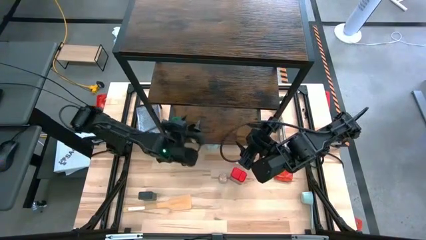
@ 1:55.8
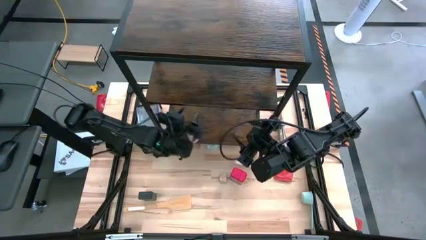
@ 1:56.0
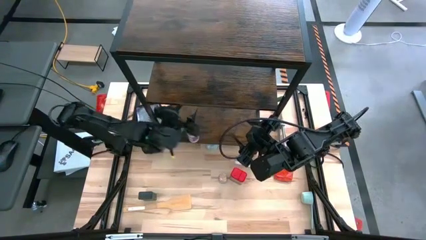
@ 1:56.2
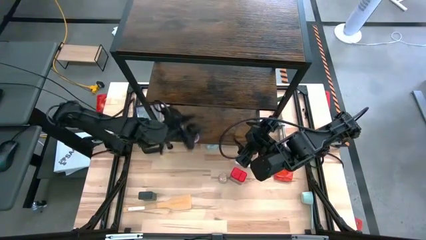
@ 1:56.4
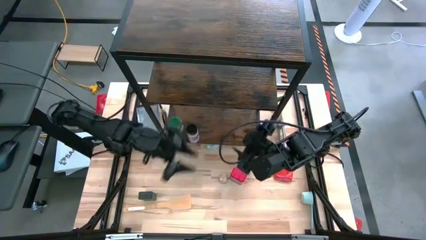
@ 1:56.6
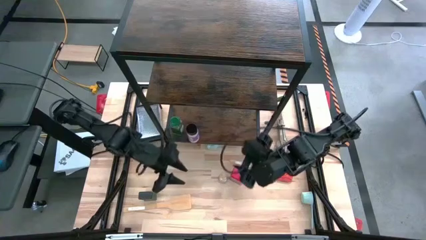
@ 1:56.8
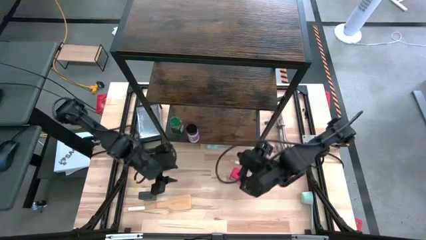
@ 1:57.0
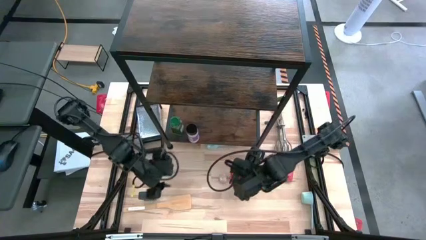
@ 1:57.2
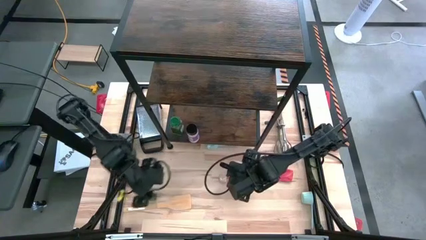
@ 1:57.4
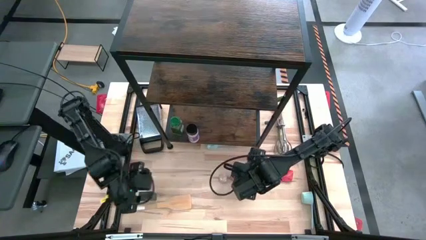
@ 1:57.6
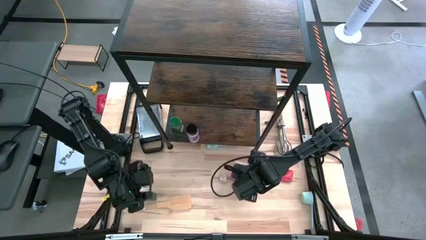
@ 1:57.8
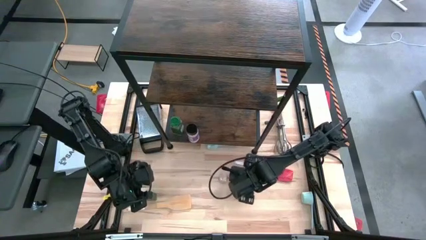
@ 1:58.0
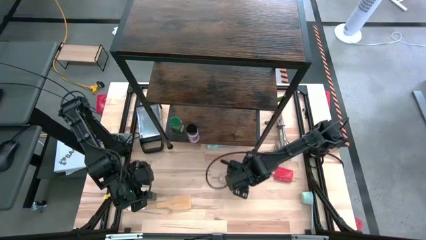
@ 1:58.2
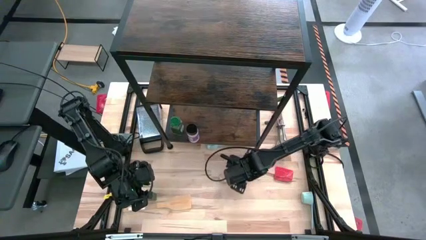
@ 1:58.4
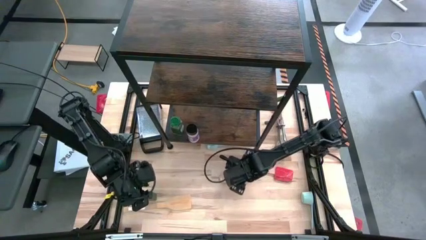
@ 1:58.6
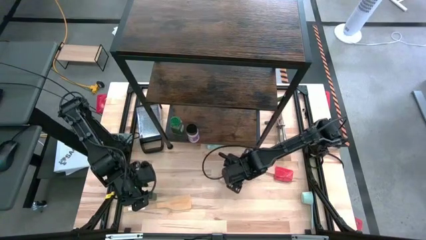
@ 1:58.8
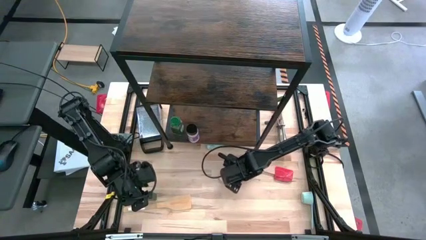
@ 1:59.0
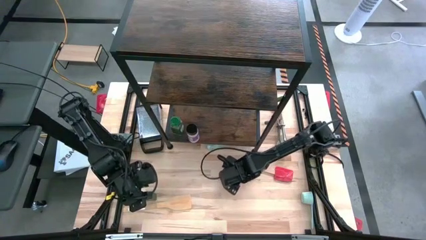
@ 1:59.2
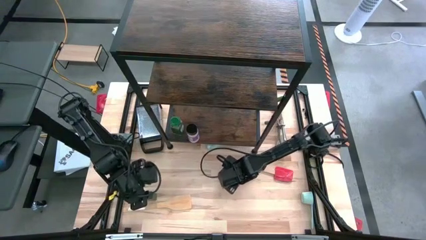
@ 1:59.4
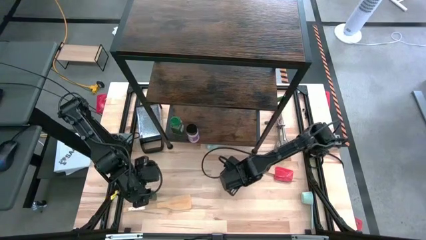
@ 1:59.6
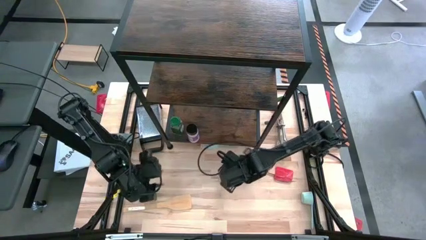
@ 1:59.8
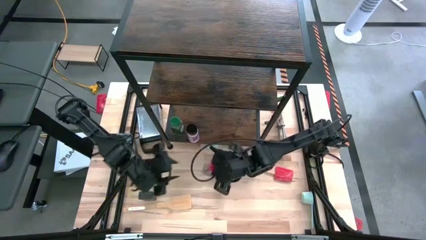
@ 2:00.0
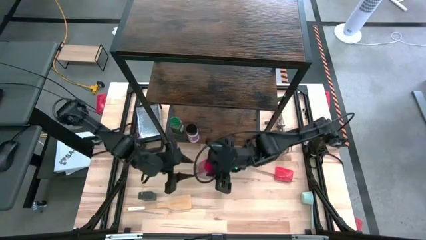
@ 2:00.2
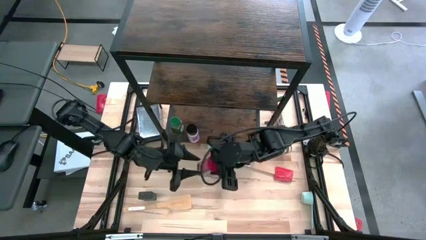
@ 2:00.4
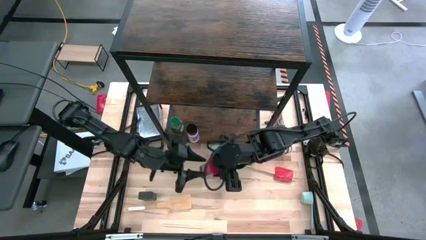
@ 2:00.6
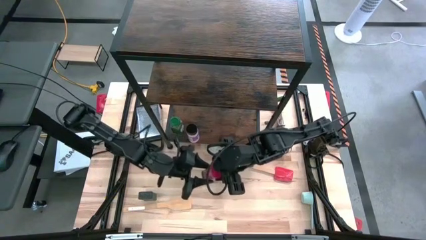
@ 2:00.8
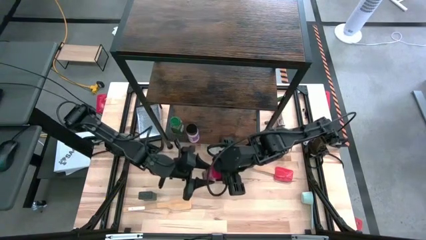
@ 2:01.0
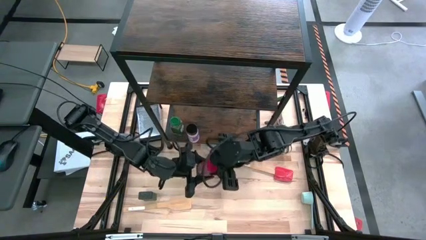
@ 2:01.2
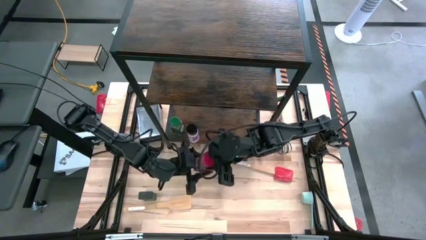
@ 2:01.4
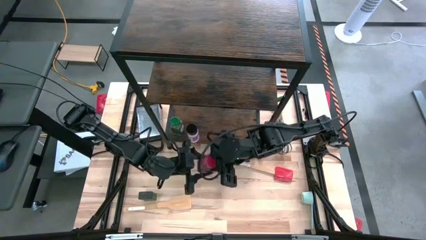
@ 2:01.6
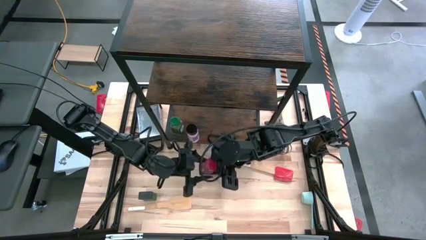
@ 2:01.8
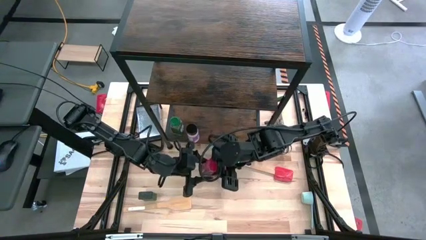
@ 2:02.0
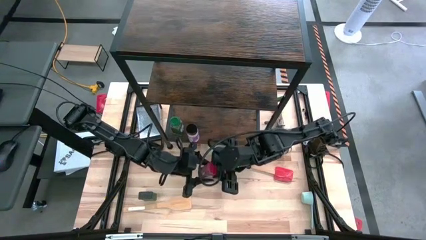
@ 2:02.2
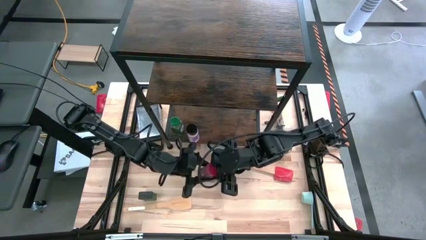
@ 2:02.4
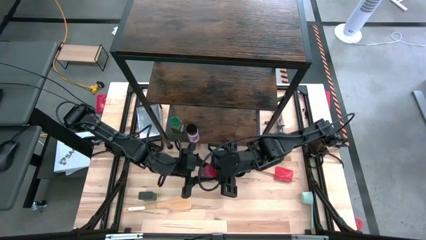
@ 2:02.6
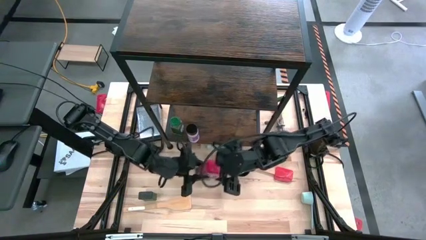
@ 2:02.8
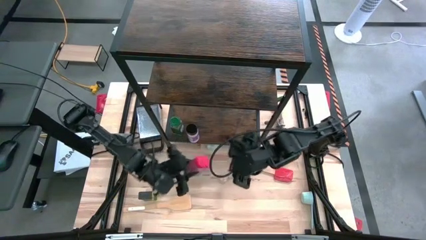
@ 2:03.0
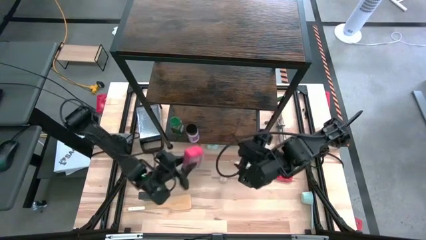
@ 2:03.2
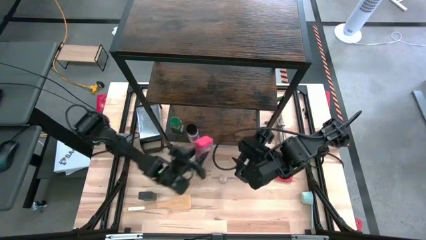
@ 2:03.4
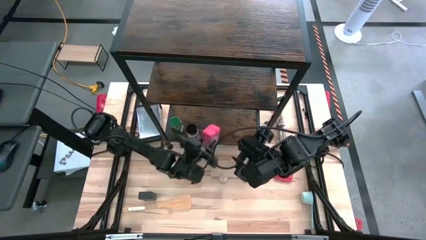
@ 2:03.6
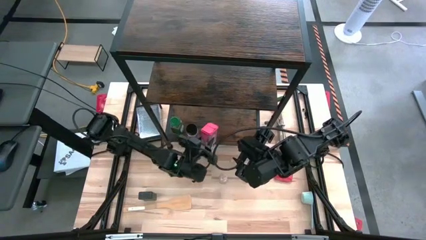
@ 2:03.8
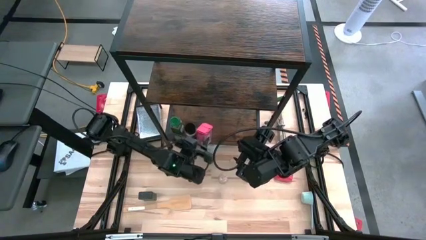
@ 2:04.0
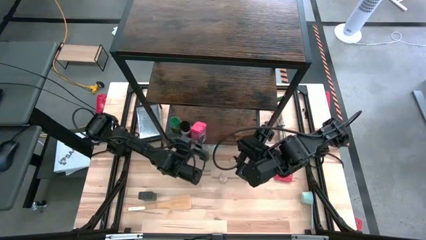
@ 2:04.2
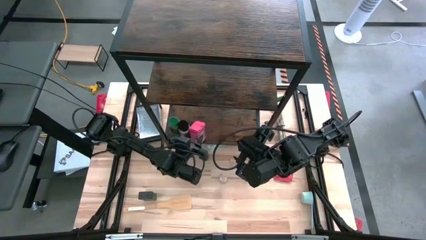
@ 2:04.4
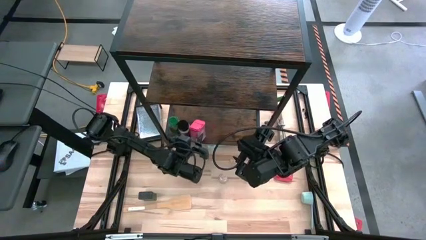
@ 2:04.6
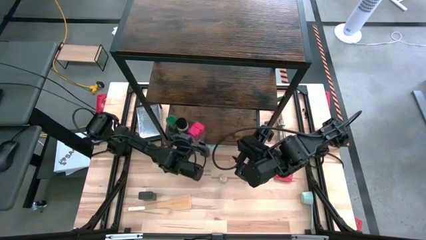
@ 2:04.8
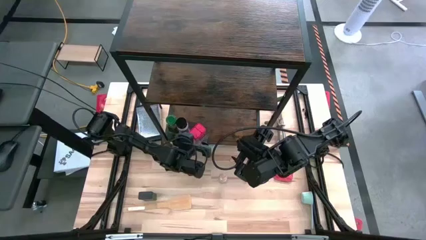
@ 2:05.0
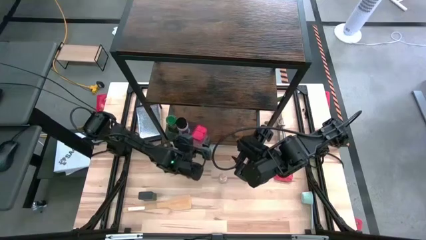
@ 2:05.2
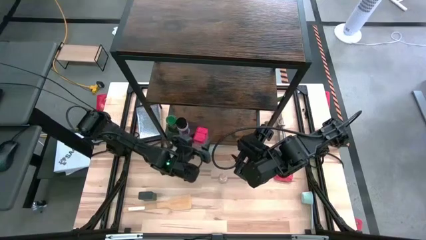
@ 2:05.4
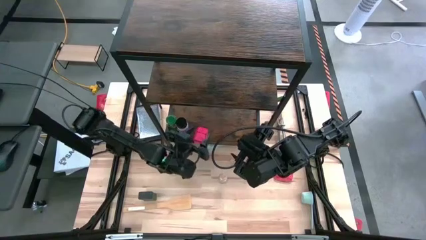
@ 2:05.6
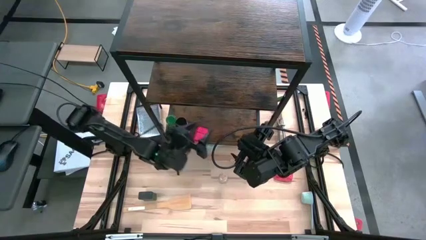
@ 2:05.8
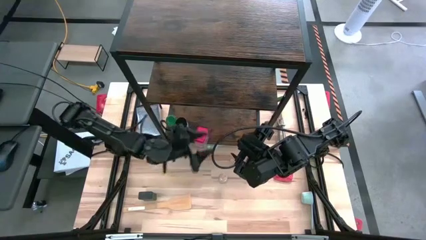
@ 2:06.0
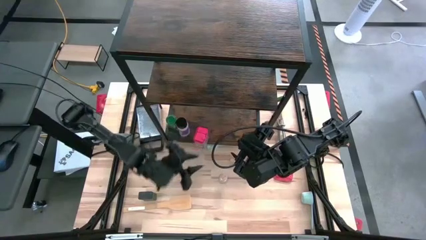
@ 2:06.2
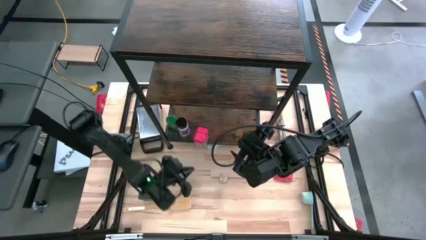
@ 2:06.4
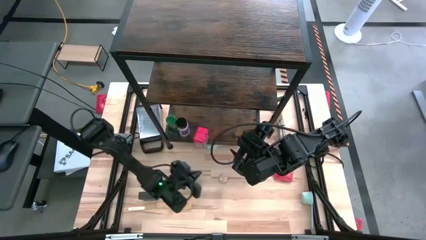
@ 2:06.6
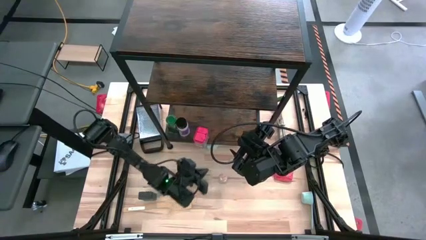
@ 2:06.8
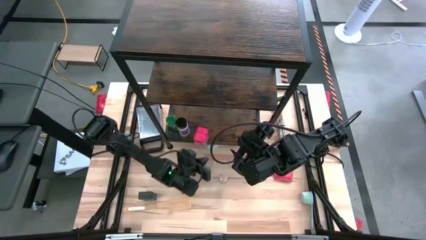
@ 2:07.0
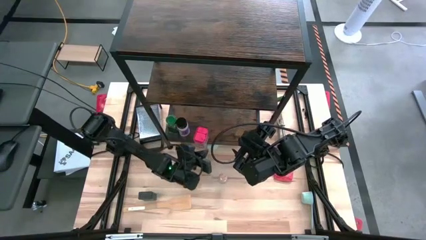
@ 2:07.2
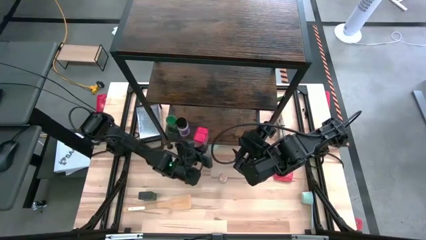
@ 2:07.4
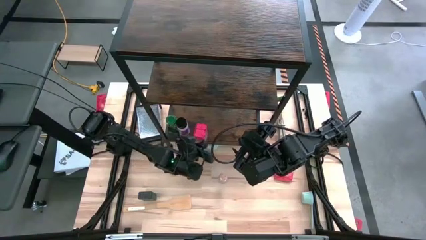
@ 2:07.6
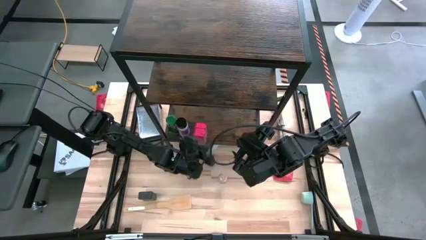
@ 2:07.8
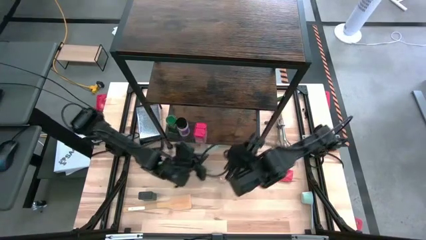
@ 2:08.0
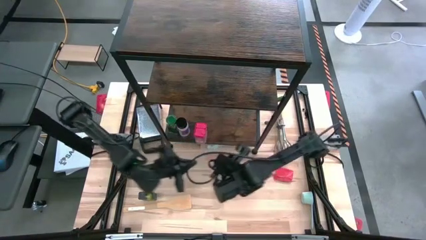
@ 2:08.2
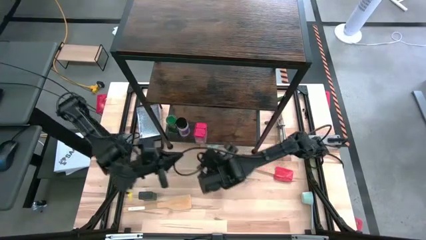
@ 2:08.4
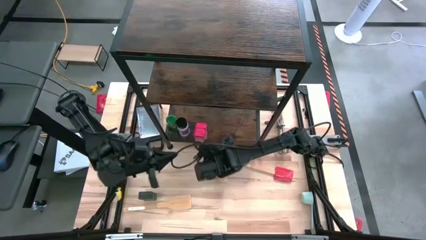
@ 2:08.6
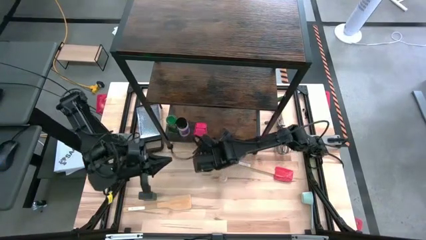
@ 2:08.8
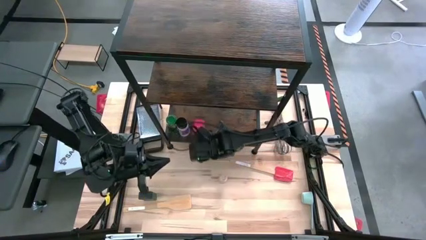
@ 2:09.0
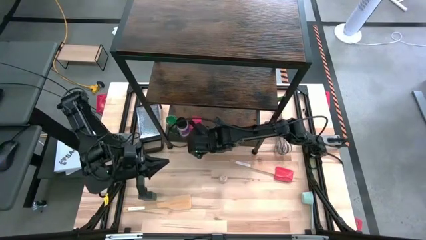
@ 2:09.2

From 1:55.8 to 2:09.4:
Task: Shelf spices
Put the red seasoning can onto the shelf

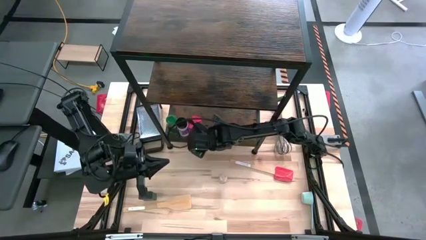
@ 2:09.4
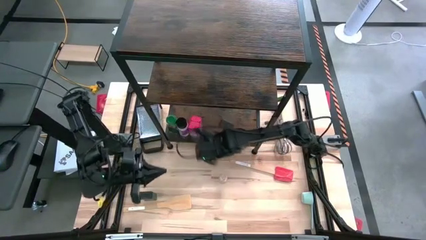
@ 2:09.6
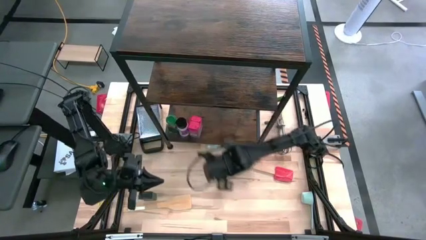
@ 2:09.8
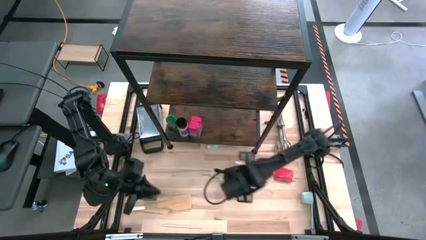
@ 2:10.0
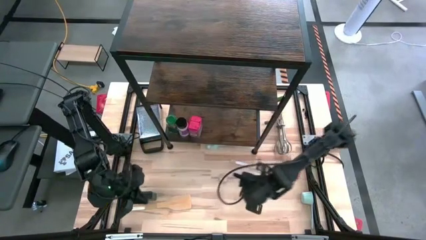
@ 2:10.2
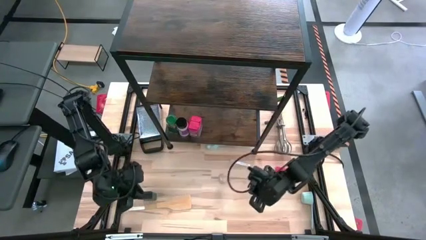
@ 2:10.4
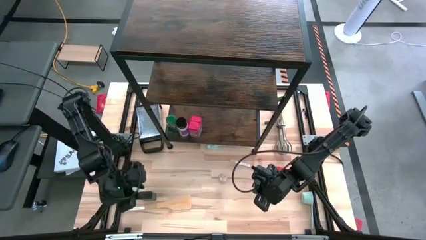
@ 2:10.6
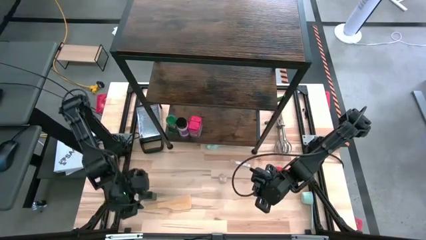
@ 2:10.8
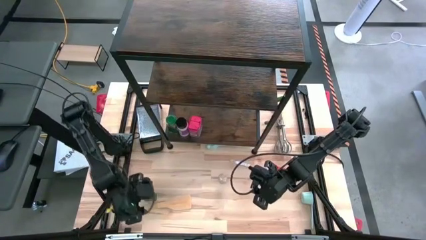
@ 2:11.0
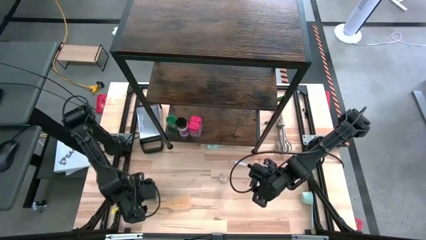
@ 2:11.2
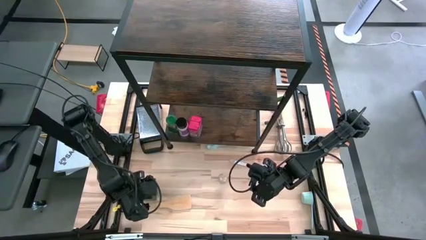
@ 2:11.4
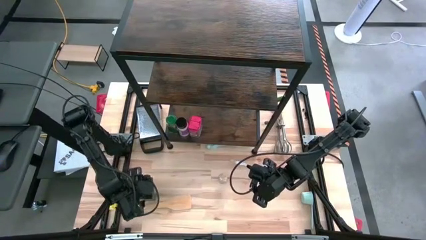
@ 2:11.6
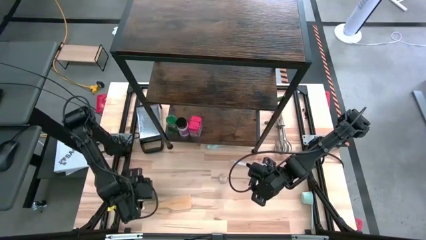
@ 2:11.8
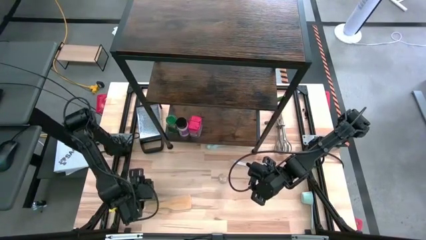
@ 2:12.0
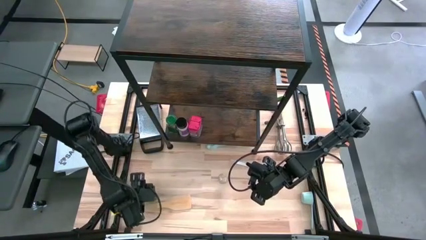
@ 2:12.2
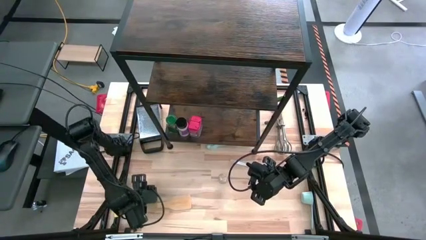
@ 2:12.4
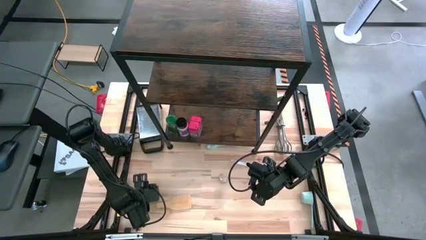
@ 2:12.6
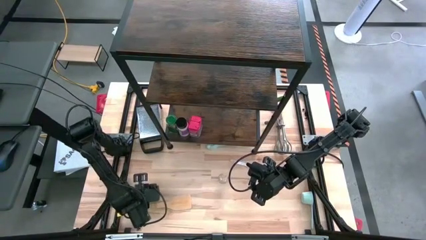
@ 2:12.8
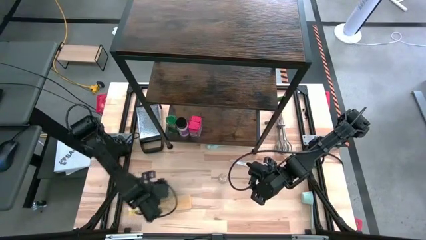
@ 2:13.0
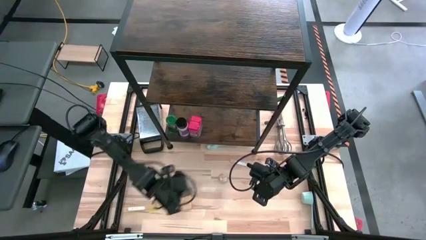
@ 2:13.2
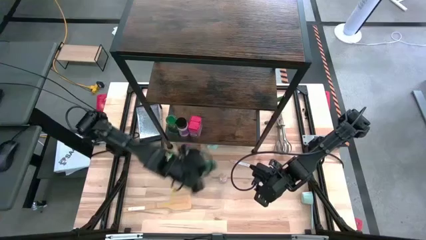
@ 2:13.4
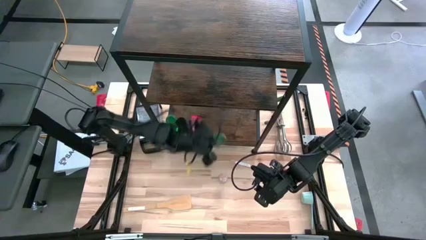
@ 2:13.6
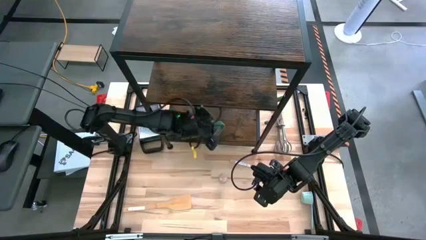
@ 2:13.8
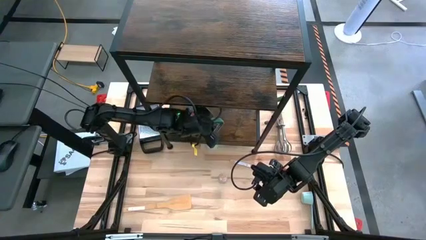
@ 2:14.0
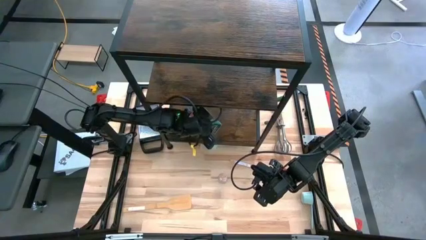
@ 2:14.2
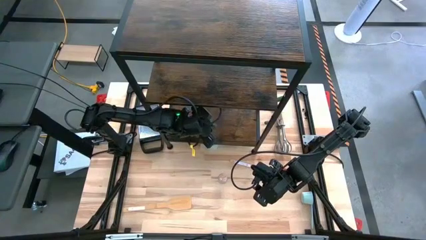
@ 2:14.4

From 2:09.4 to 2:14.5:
Put the green seasoning can onto the shelf
